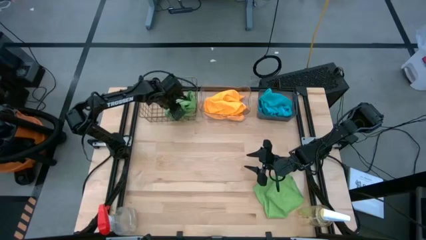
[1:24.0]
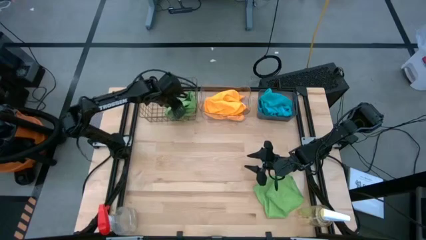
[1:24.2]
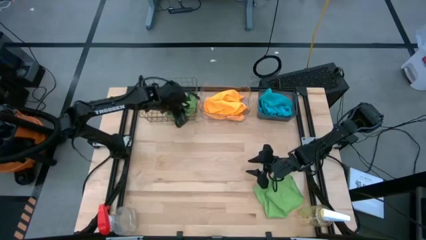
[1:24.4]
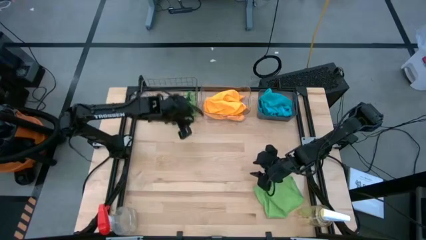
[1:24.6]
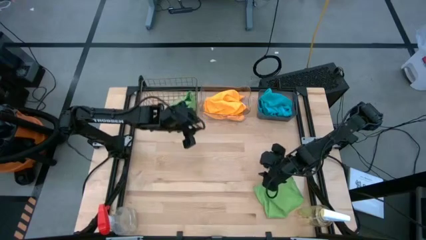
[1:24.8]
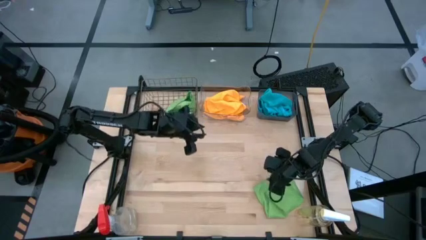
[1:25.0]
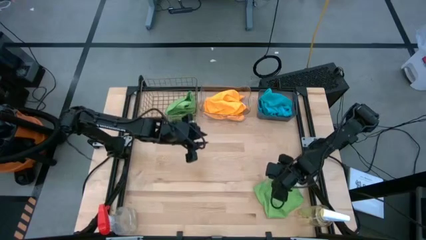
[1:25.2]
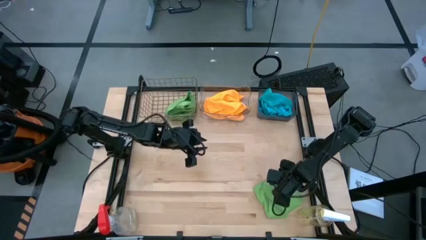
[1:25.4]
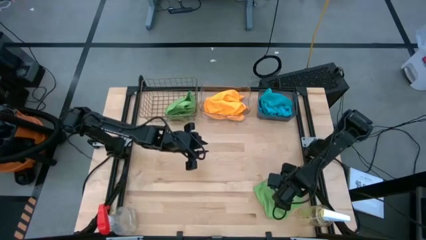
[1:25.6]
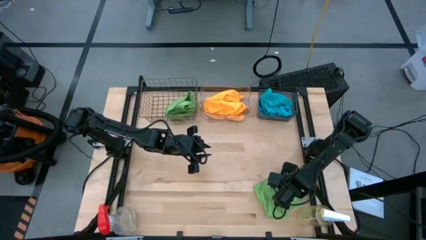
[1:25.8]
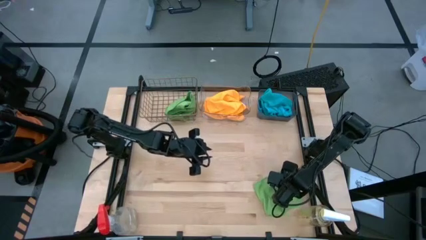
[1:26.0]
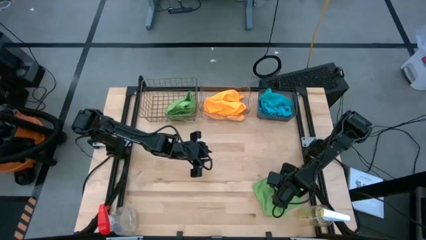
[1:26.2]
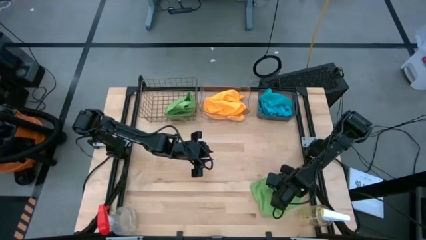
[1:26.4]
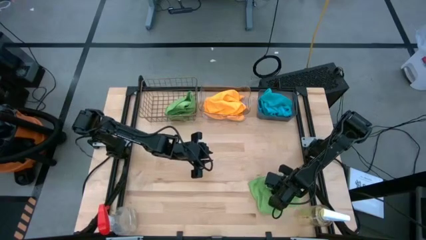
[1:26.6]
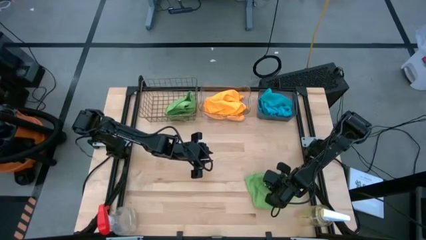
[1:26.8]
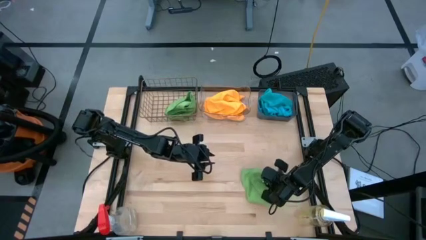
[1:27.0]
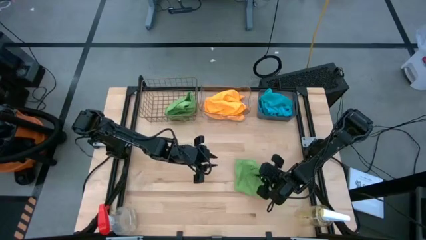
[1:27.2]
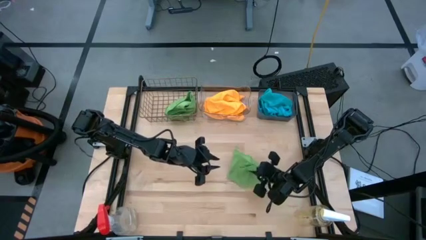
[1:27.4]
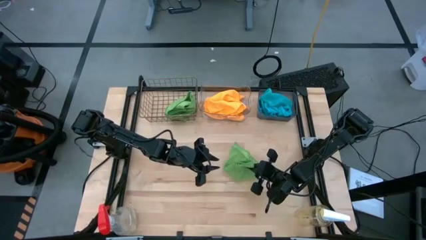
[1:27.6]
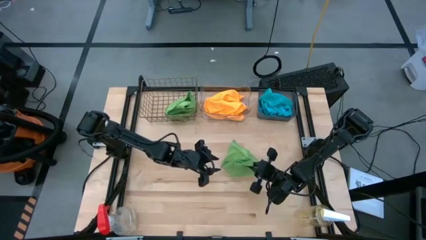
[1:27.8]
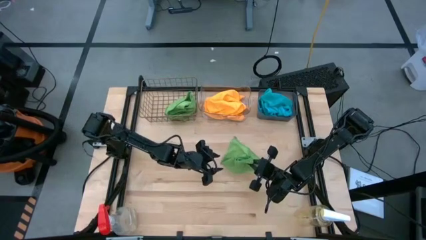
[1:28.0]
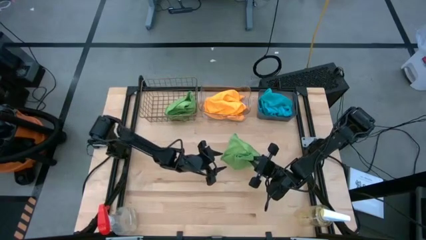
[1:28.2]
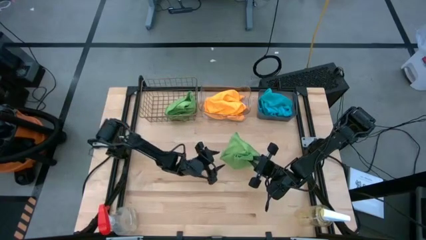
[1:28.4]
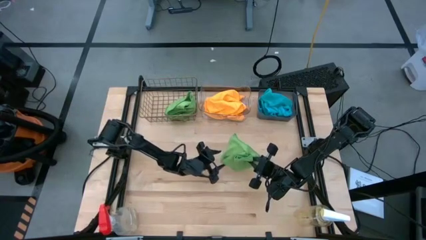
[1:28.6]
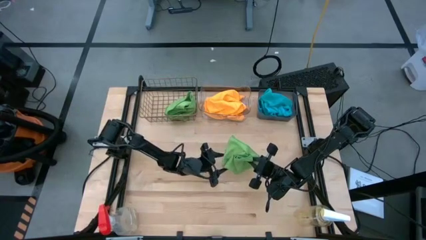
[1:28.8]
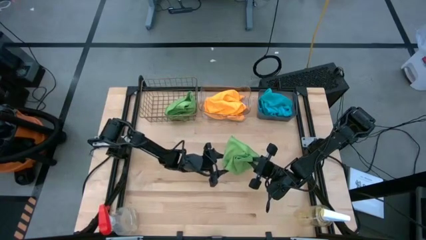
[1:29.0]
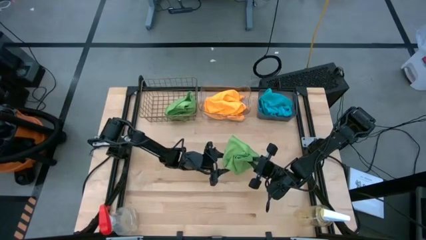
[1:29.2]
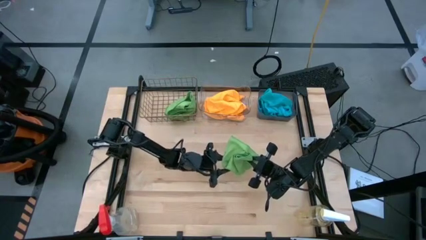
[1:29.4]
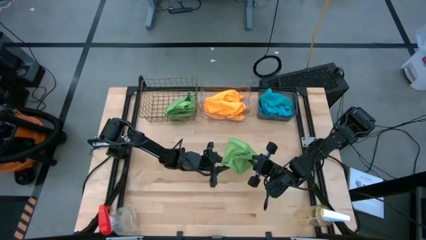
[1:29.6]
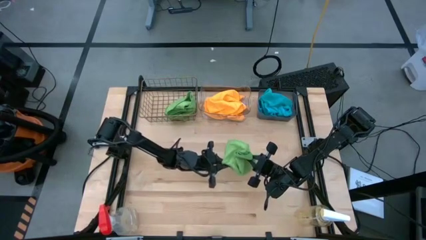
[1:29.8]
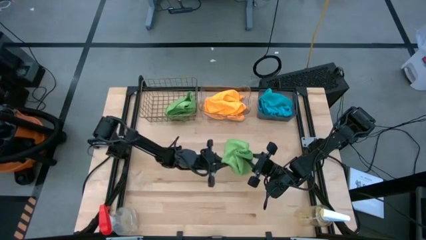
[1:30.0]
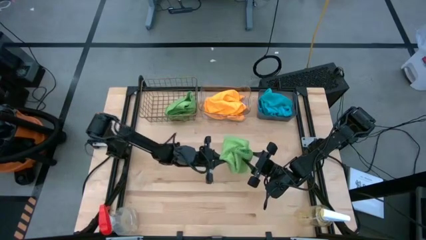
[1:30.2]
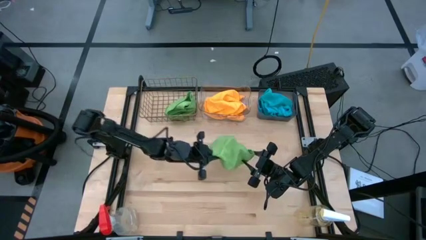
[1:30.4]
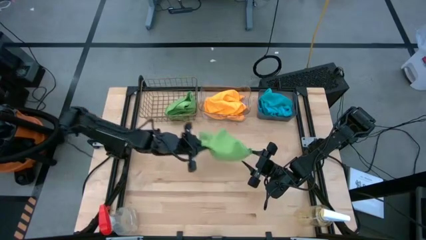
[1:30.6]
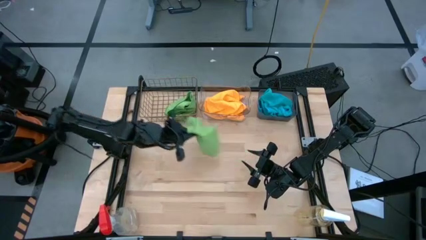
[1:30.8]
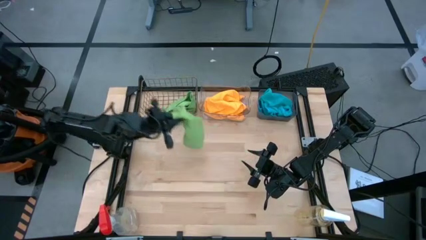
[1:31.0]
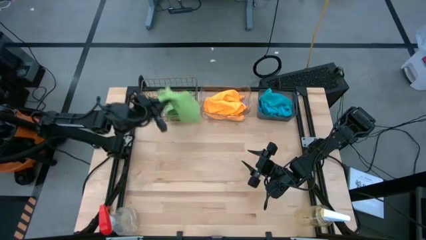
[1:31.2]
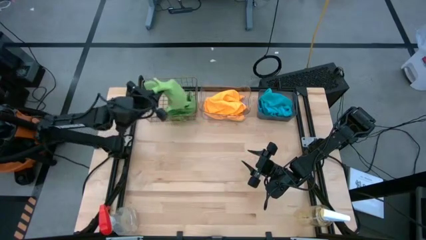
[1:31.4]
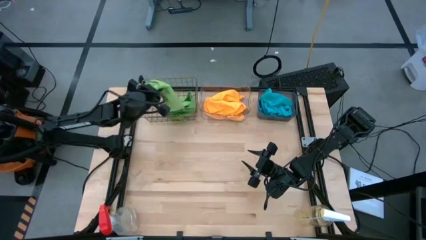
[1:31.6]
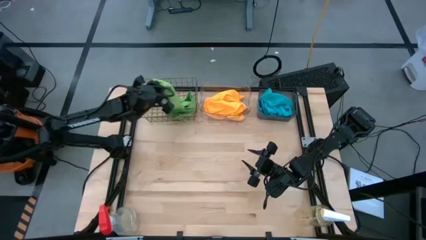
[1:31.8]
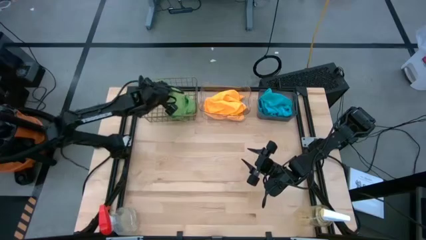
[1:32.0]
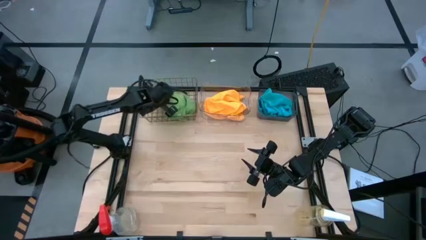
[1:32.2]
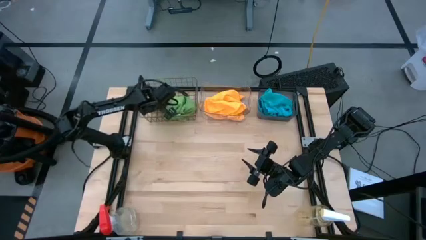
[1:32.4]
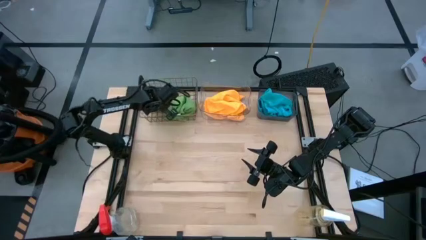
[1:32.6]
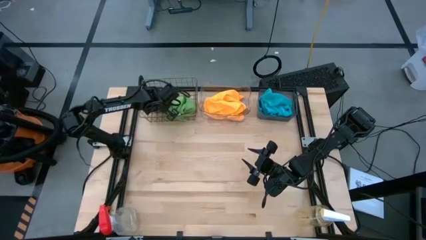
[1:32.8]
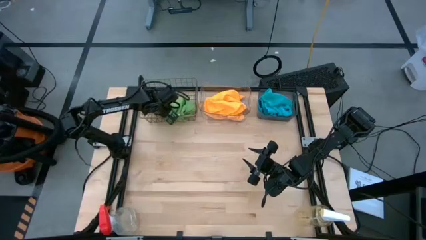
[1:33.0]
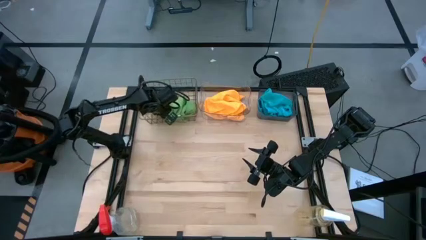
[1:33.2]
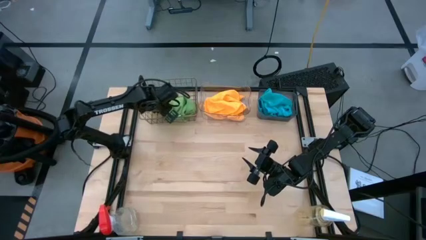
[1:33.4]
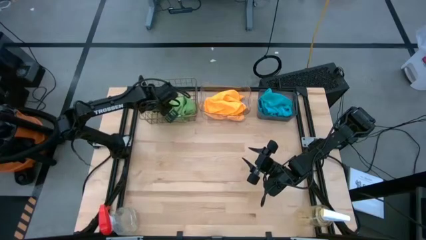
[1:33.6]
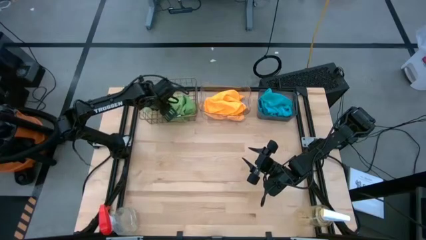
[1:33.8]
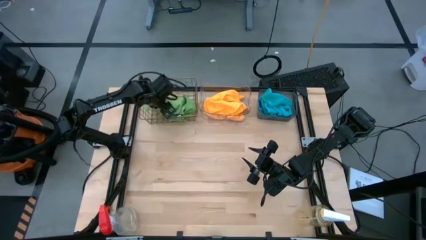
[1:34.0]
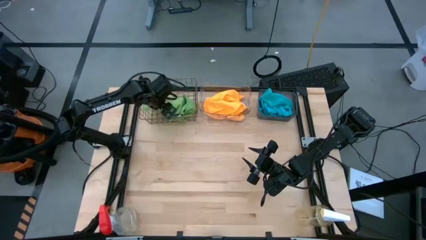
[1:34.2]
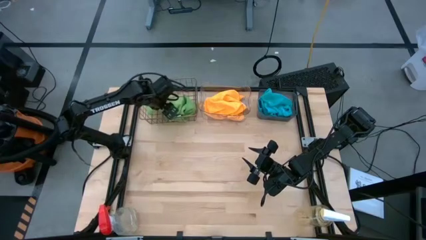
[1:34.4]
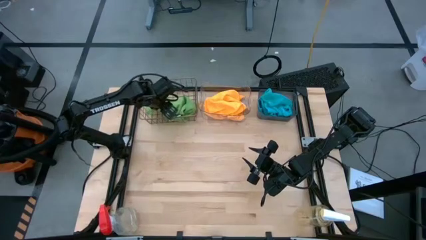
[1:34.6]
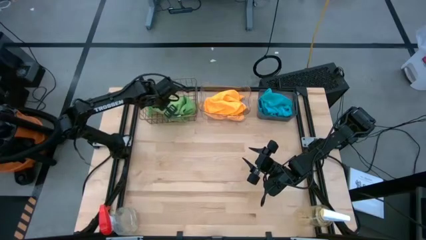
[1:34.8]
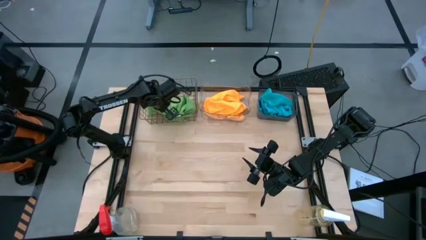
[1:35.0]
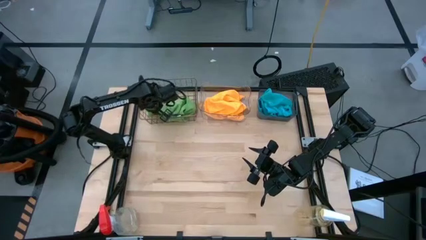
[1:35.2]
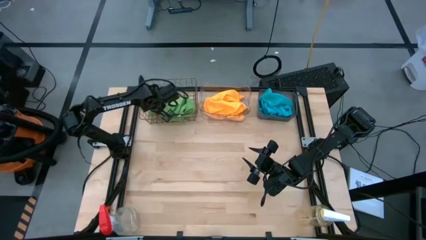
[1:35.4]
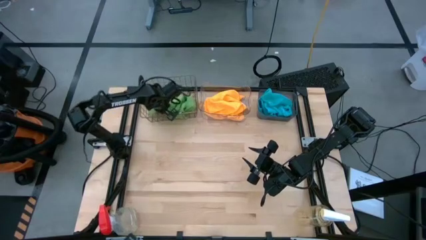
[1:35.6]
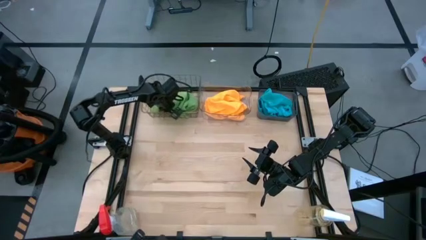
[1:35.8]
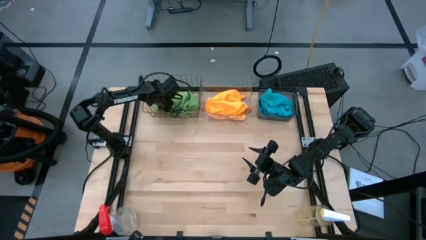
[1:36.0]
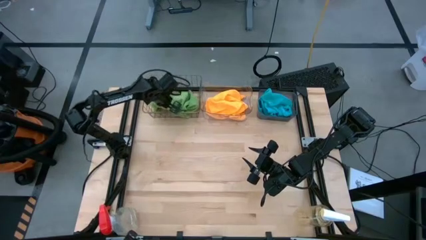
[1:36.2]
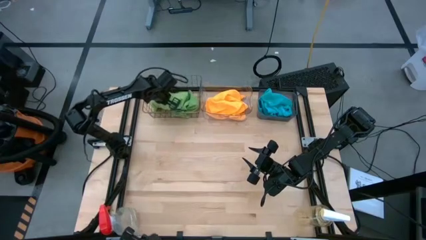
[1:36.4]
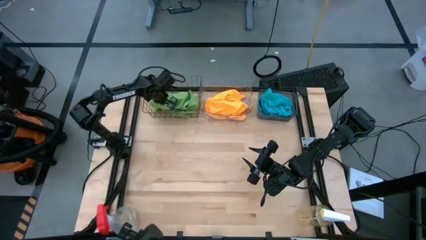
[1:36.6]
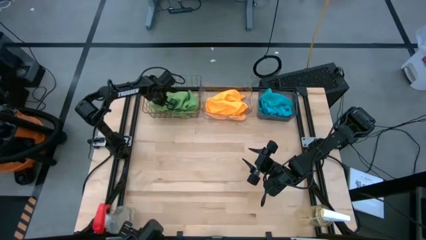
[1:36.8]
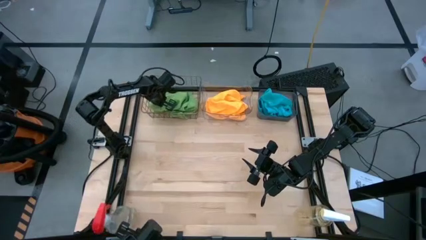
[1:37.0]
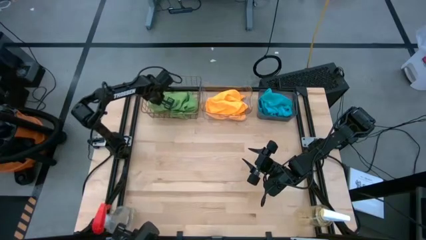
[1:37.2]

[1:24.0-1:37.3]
Task: Sort microfiber towel by color & place in baskets
Put the green microfiber towel into the wire basket
